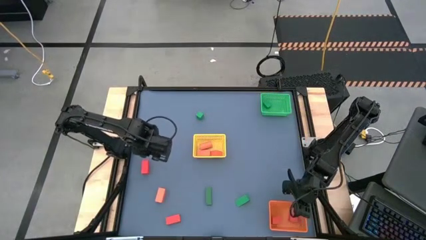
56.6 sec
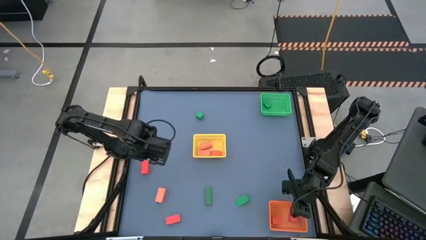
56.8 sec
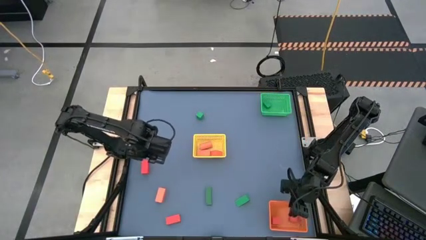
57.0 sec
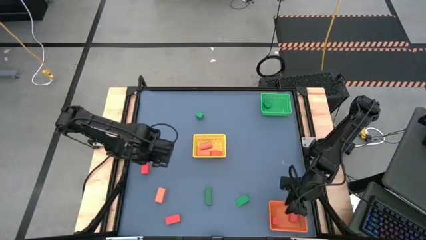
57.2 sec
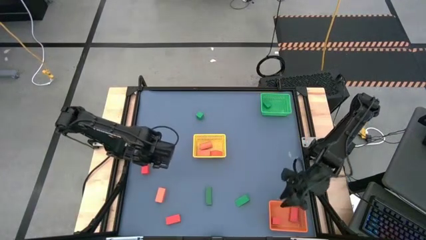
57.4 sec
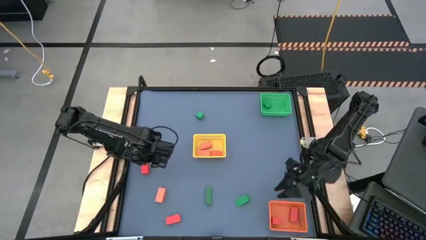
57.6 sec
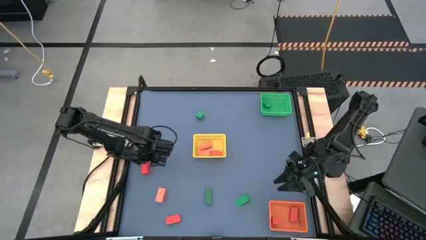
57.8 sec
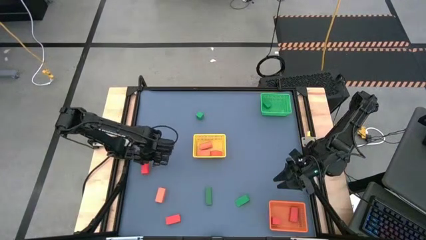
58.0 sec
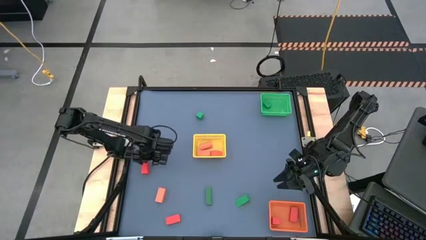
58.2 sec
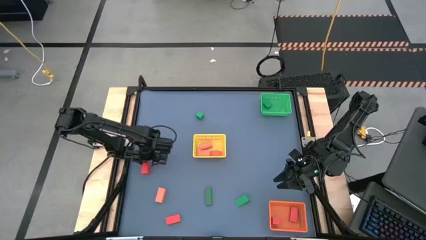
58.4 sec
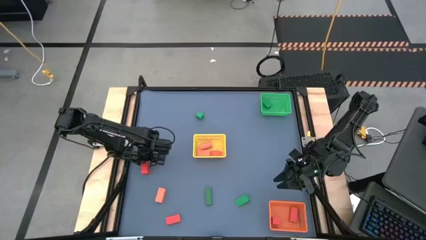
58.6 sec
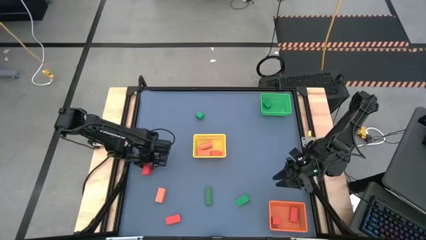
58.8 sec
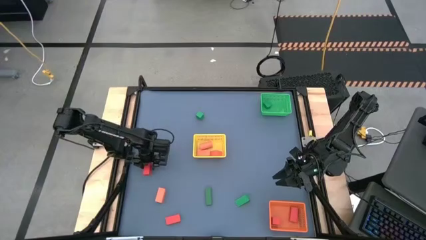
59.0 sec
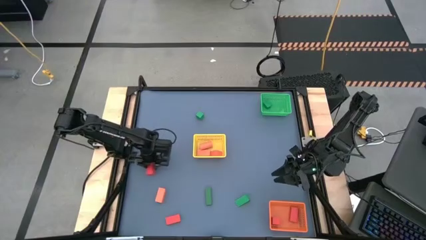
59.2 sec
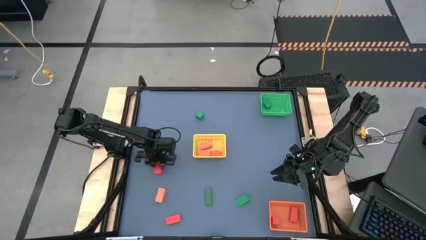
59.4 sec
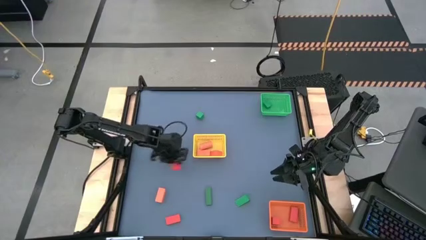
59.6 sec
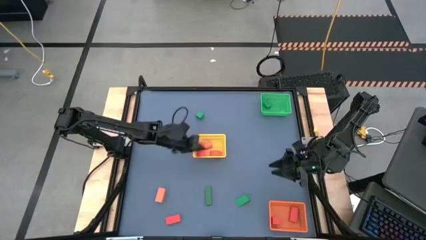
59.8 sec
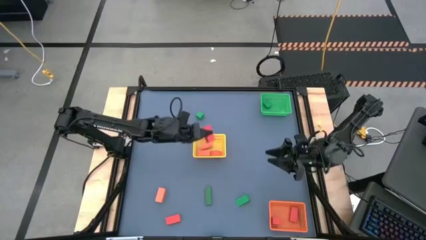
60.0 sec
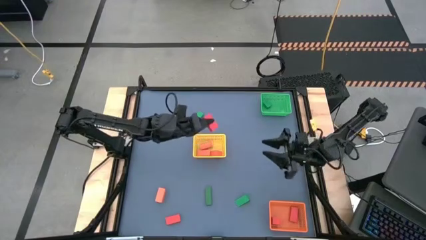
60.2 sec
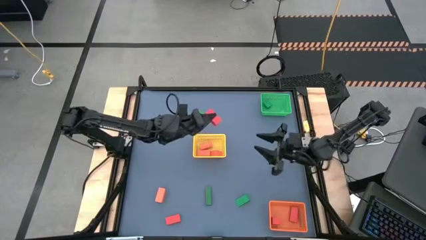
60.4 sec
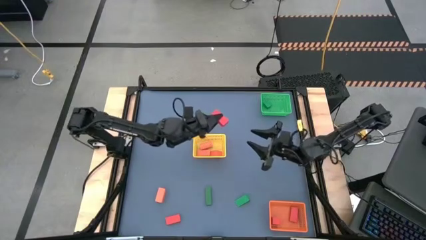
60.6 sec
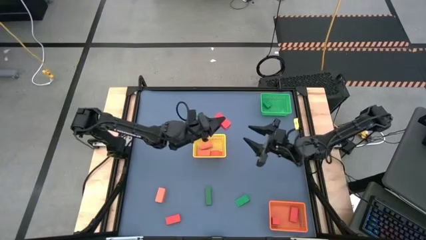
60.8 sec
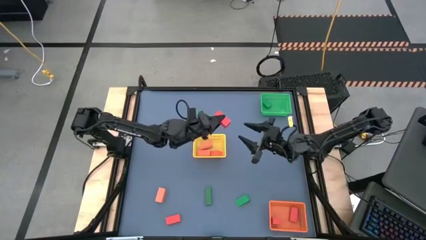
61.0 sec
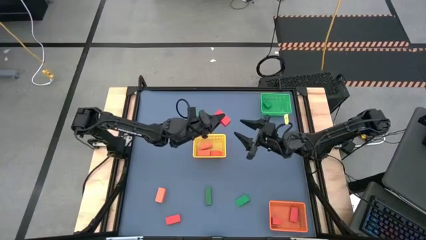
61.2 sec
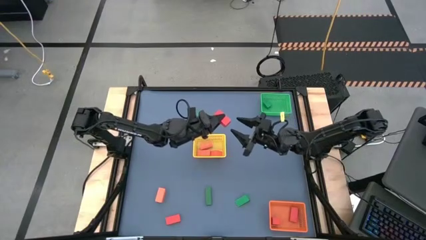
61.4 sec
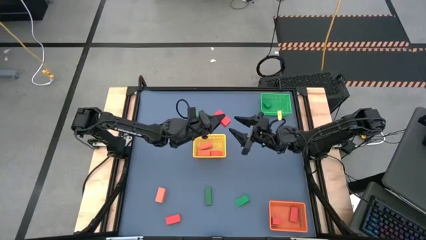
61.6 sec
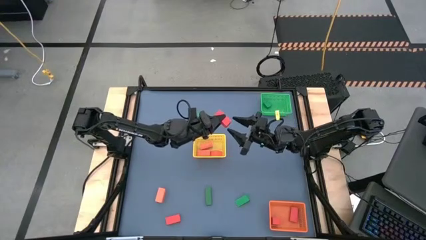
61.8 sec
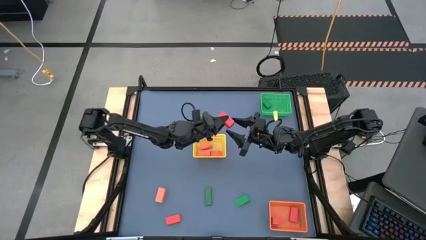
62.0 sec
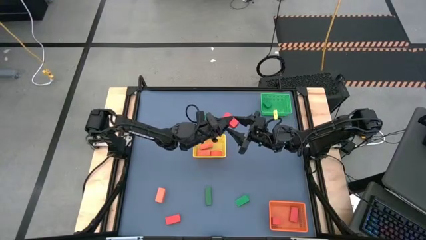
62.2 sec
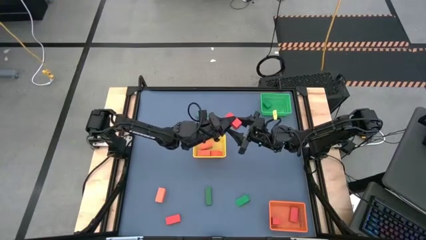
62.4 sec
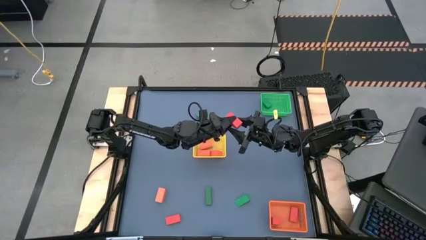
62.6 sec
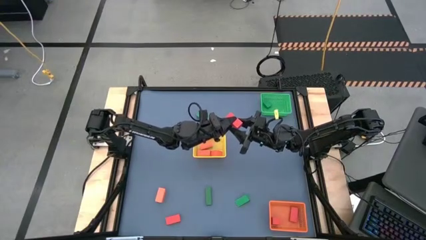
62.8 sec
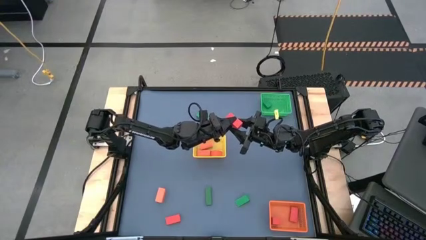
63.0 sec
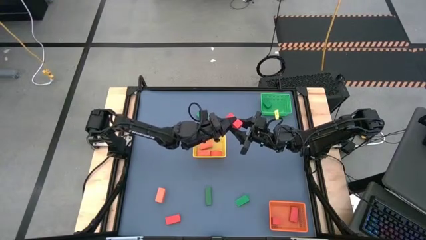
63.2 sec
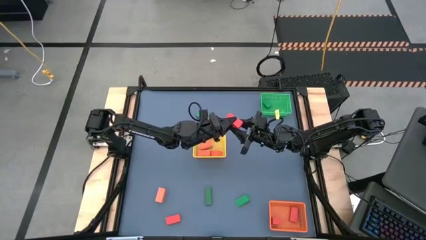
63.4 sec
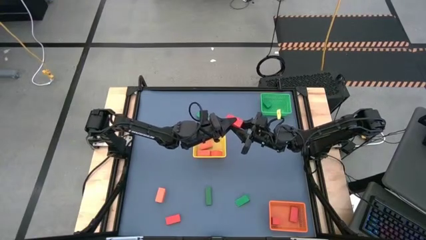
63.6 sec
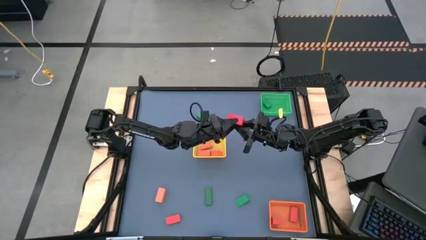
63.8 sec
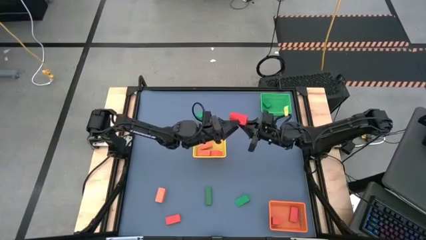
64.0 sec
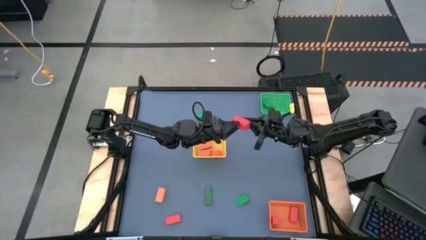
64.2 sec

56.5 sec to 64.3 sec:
Task: Sort & place blocks by color
Put the red block into the orange basket

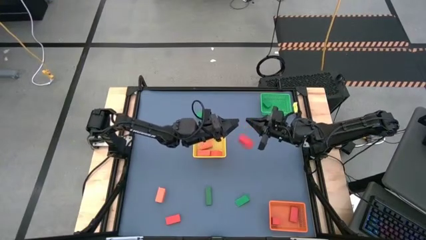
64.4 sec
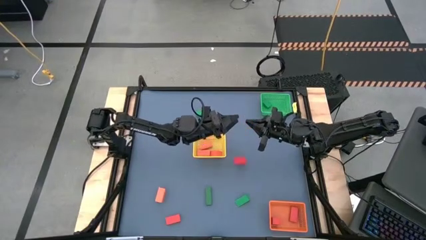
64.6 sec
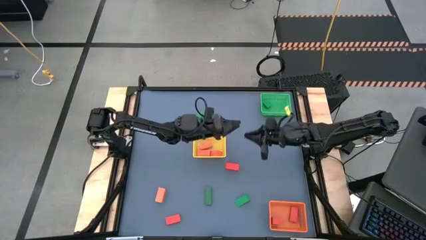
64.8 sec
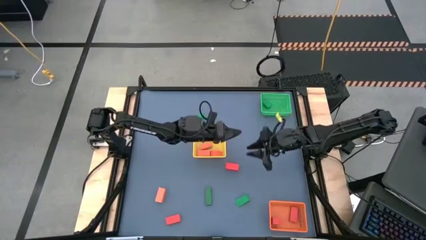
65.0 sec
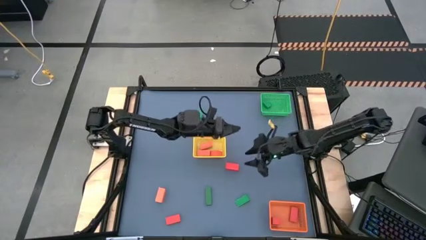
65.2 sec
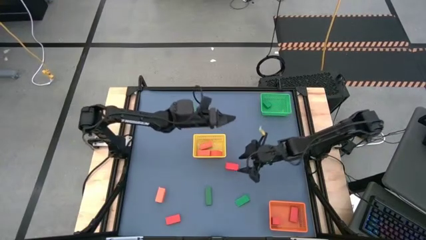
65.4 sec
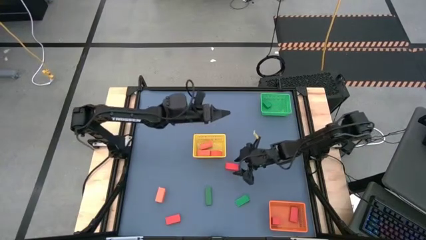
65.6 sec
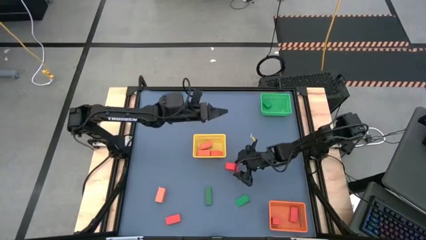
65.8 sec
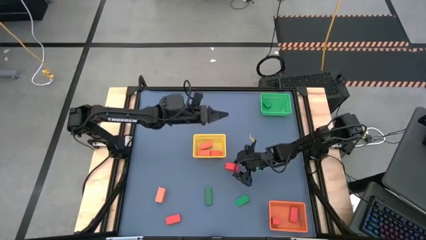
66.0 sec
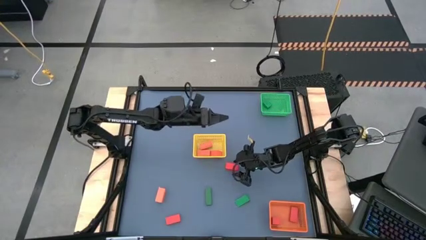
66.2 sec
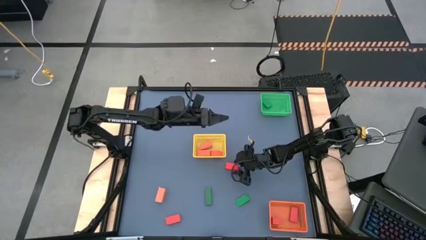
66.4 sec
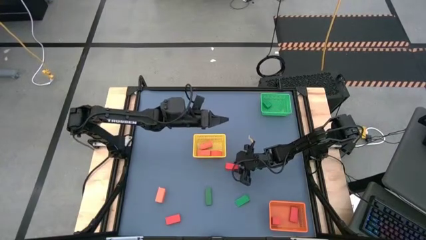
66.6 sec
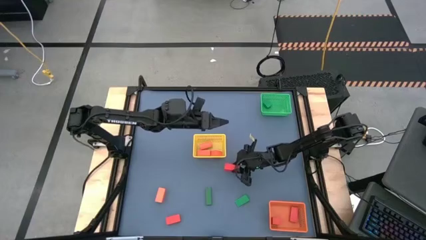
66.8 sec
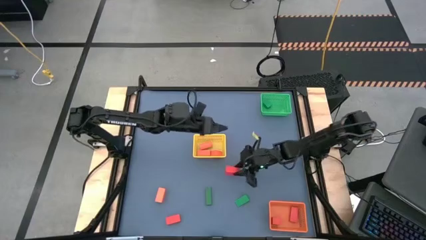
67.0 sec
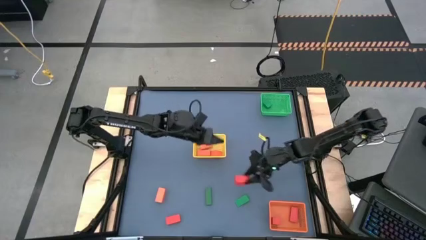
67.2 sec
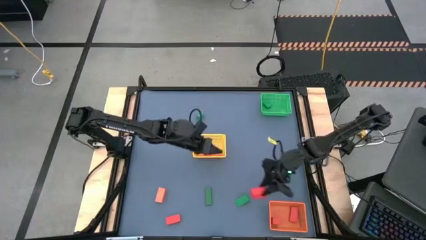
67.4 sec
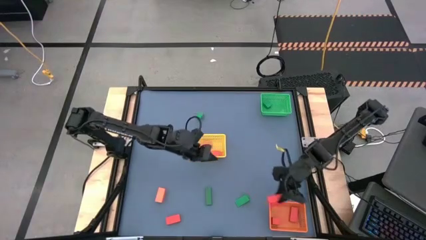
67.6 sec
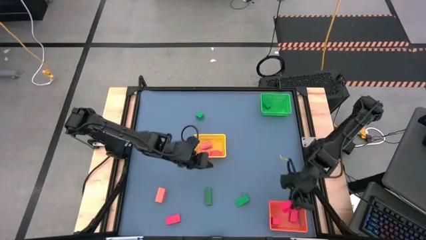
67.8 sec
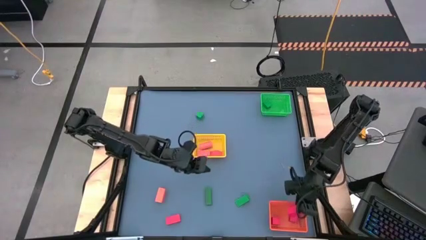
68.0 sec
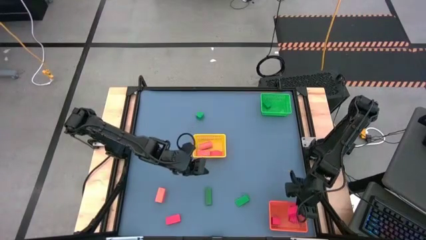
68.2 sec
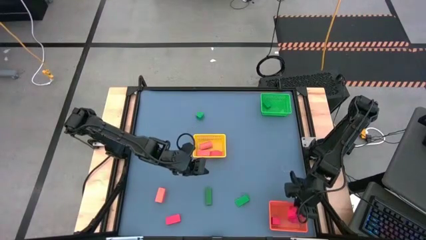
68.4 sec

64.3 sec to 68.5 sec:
Put the red block into the orange basket

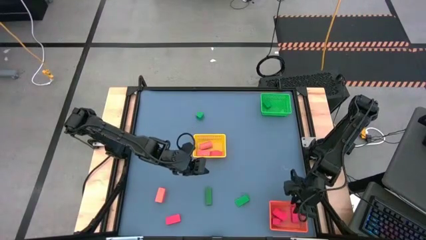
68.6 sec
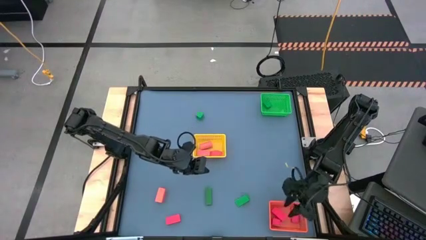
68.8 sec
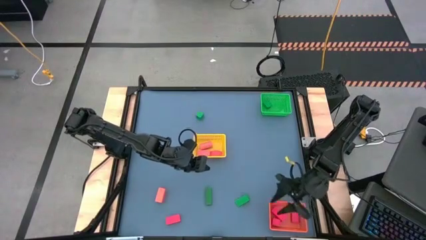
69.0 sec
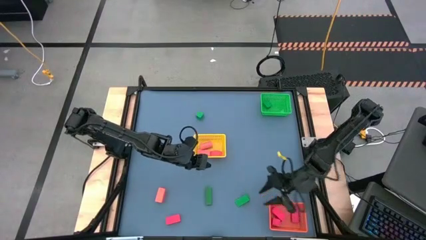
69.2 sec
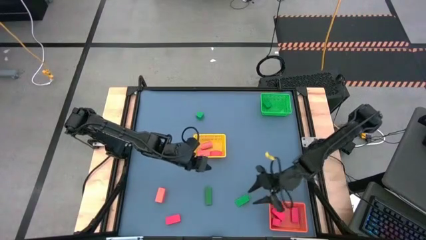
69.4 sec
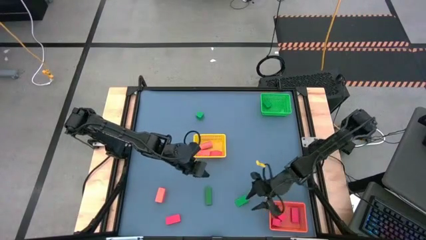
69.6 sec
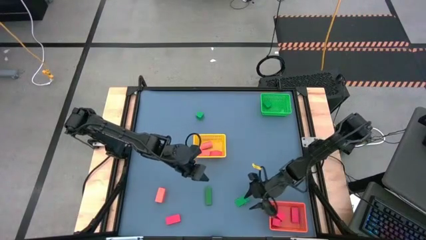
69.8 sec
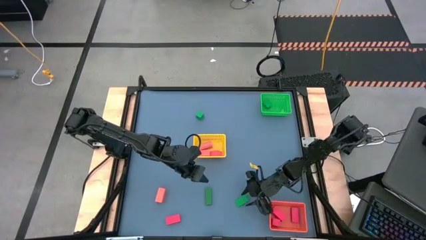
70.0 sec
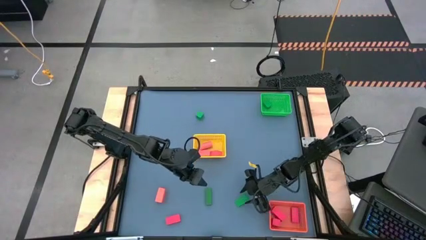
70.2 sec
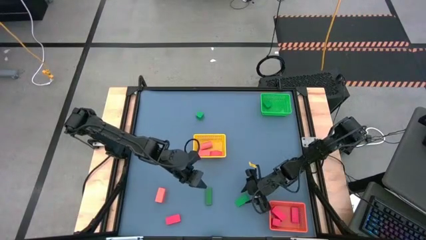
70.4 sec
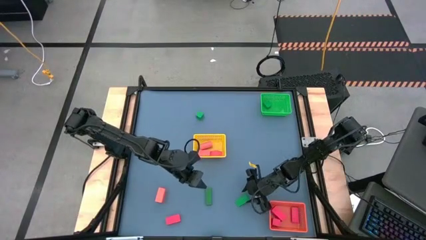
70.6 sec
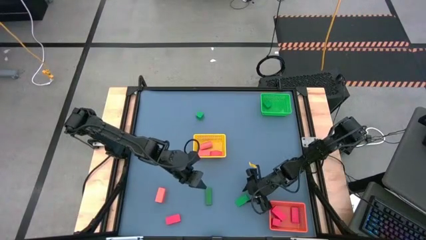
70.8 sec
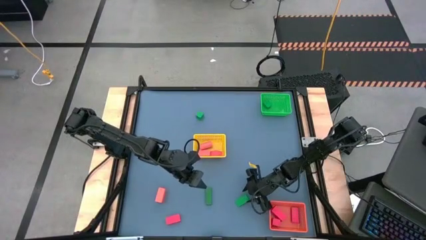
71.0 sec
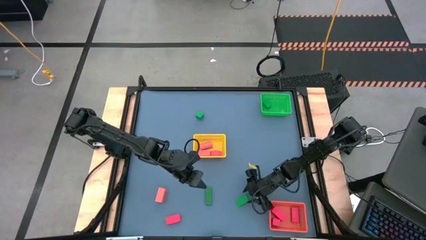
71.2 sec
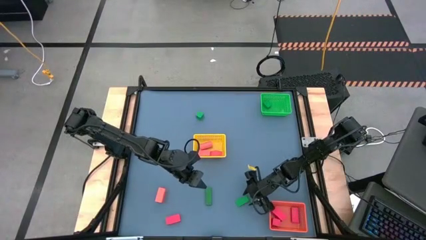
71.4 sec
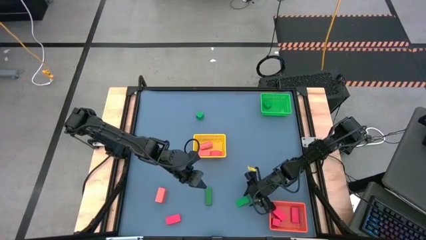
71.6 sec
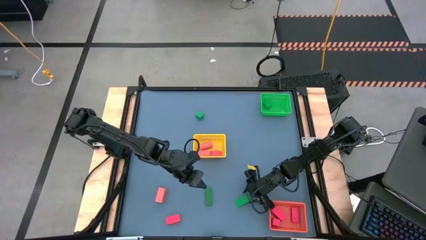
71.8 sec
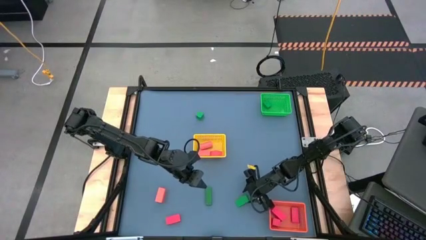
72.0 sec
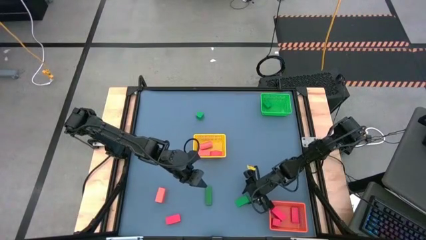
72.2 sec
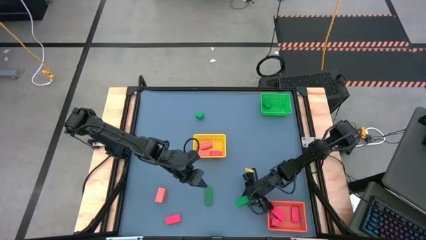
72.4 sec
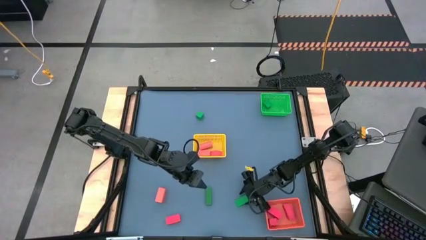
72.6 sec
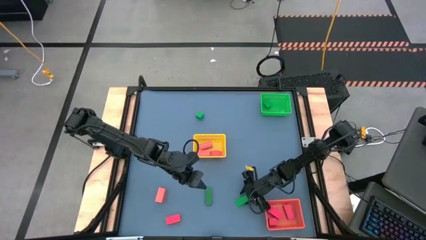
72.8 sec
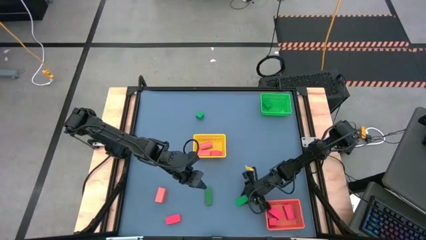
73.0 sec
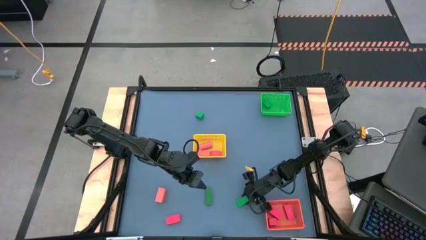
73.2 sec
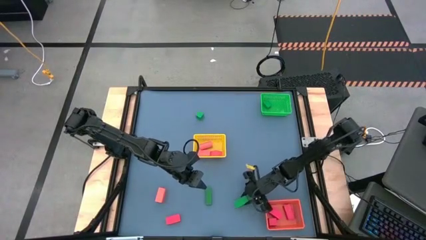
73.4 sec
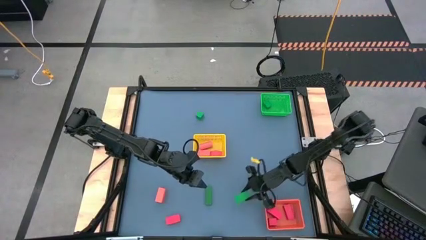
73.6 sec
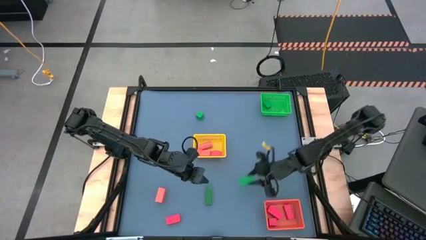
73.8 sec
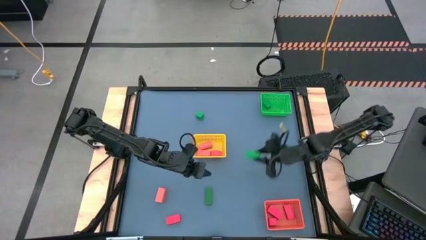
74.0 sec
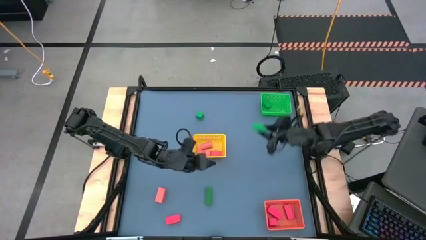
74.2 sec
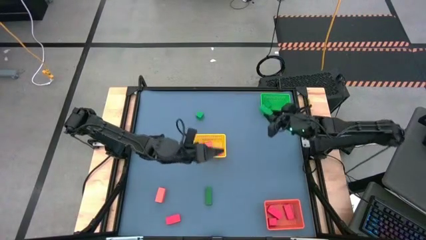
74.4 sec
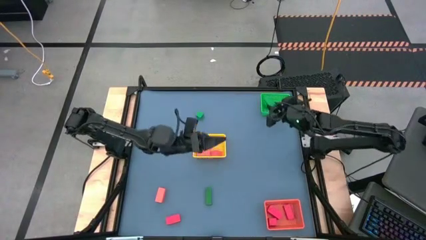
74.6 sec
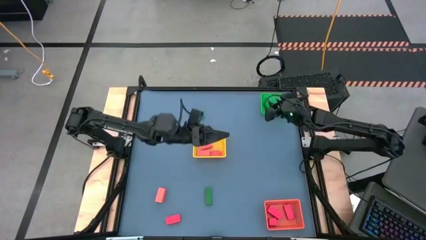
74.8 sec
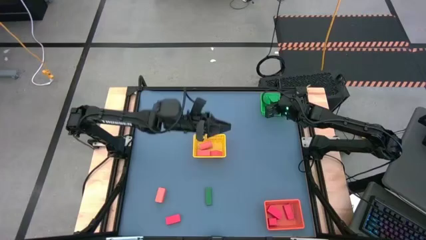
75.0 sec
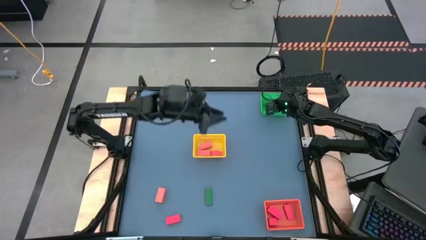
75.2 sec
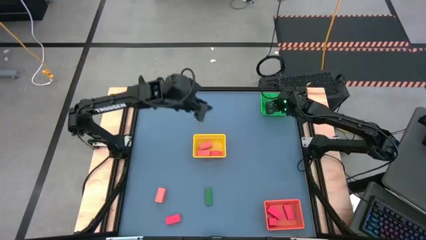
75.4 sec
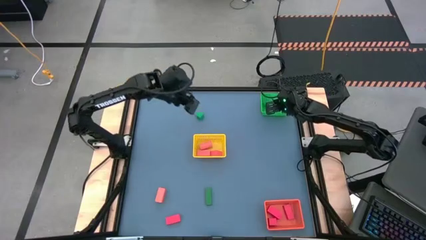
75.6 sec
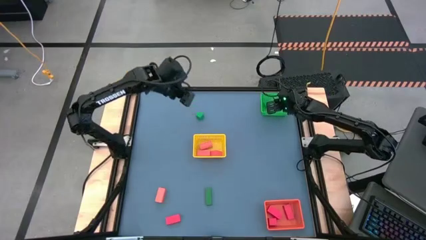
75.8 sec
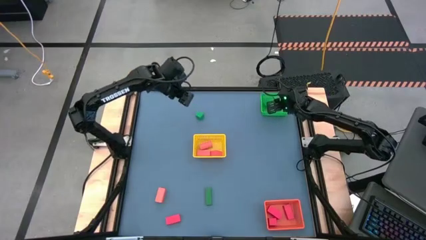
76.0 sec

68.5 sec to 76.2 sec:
Put the green block into the green basket
